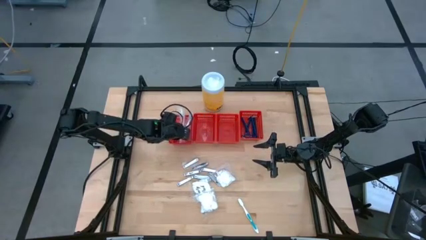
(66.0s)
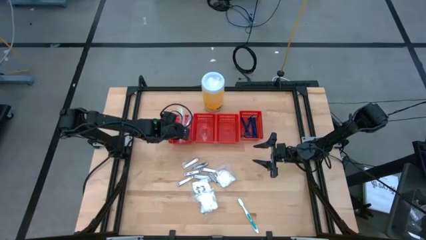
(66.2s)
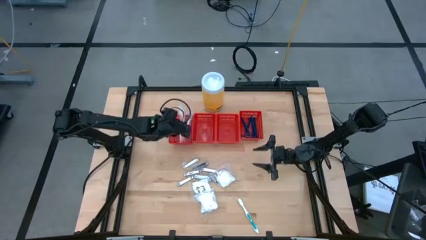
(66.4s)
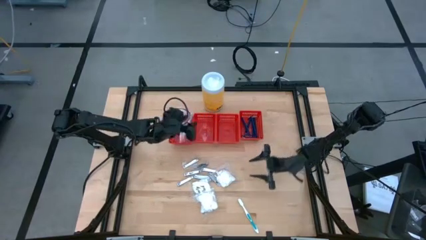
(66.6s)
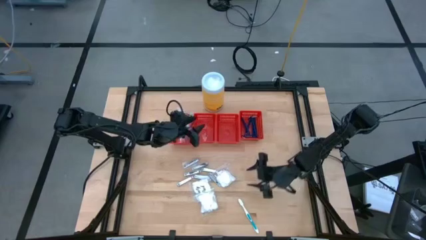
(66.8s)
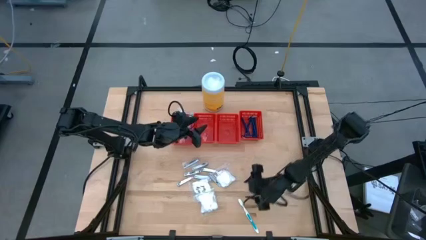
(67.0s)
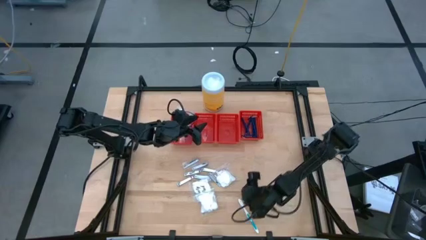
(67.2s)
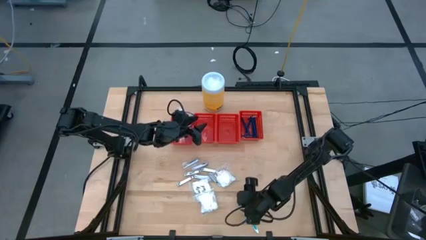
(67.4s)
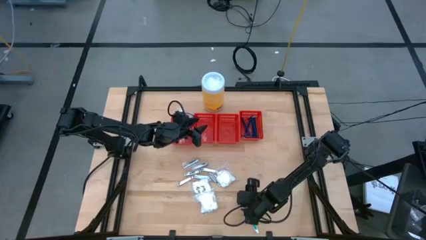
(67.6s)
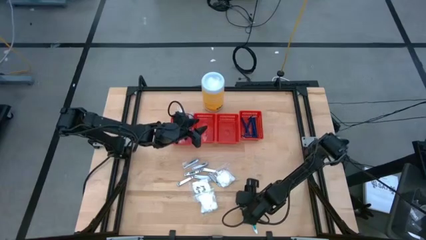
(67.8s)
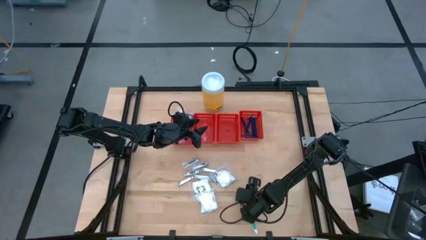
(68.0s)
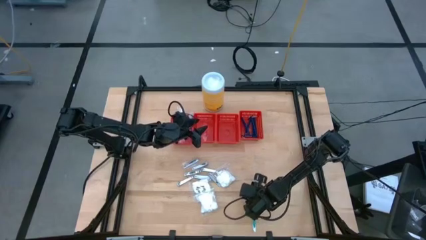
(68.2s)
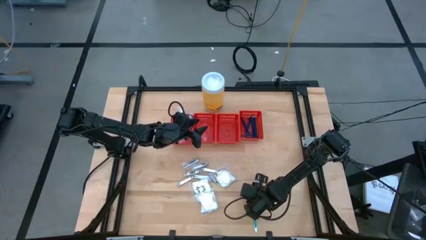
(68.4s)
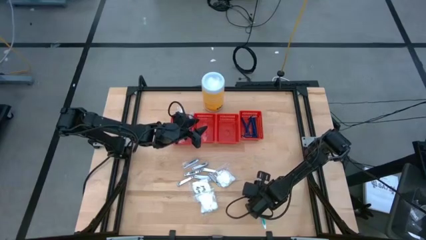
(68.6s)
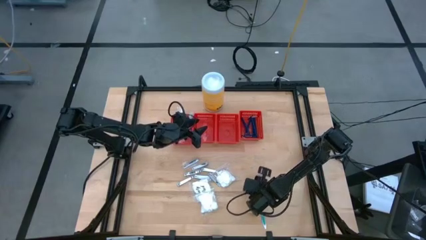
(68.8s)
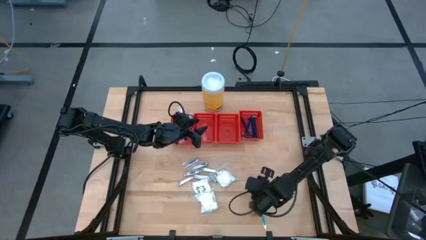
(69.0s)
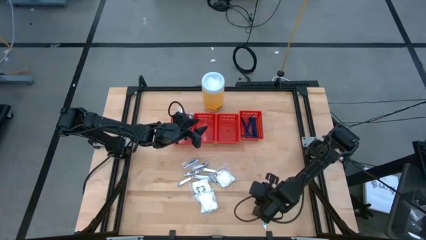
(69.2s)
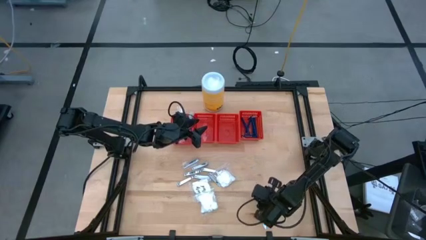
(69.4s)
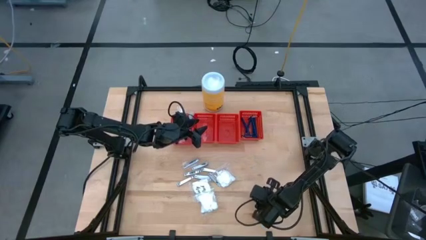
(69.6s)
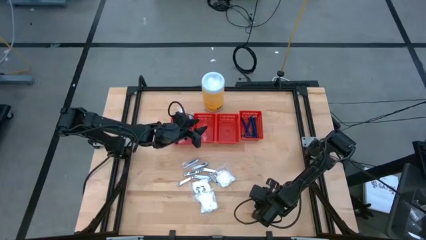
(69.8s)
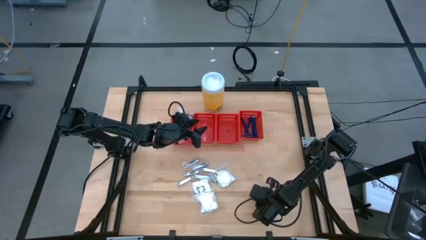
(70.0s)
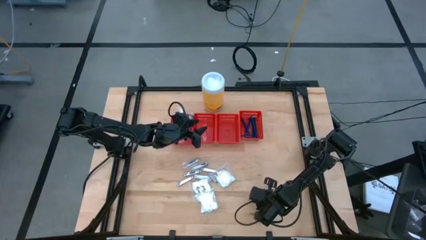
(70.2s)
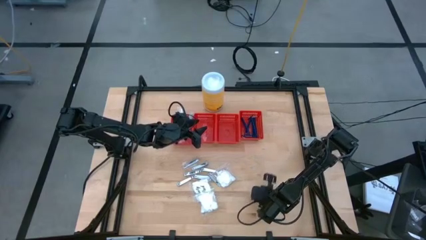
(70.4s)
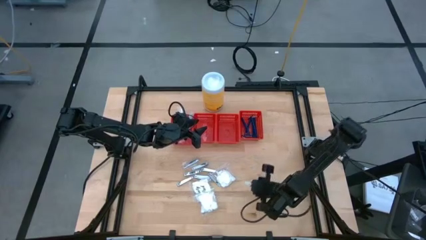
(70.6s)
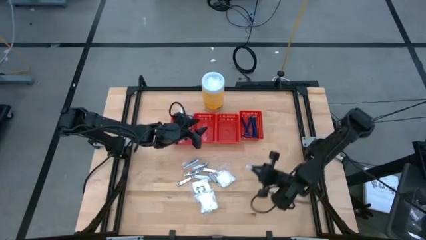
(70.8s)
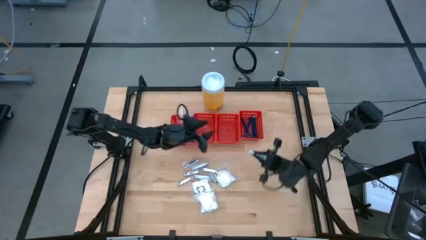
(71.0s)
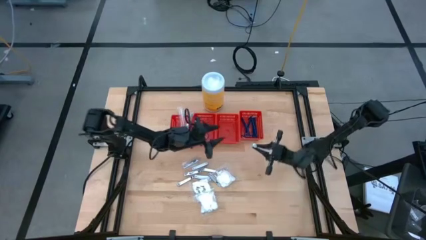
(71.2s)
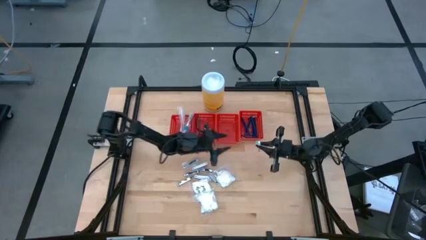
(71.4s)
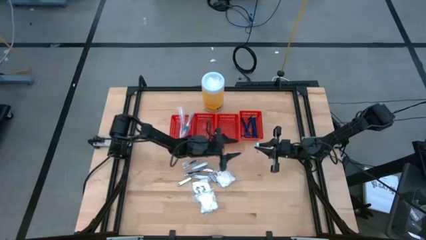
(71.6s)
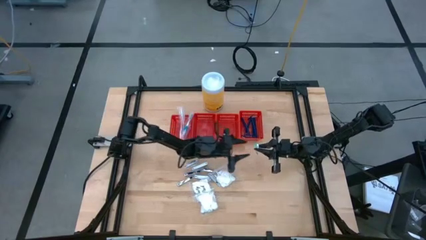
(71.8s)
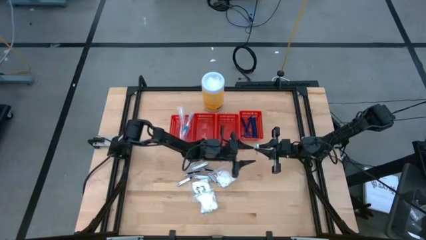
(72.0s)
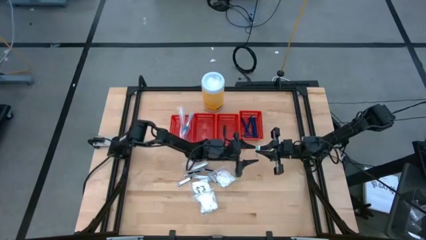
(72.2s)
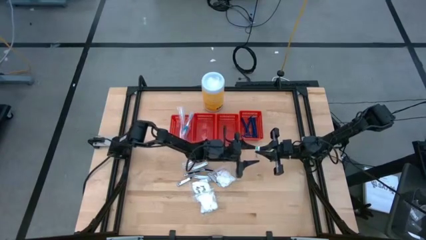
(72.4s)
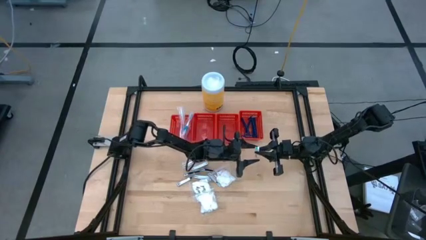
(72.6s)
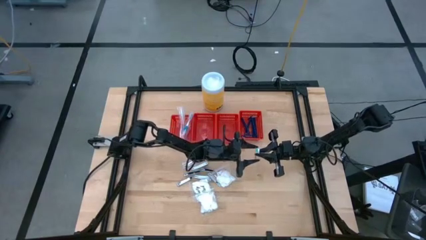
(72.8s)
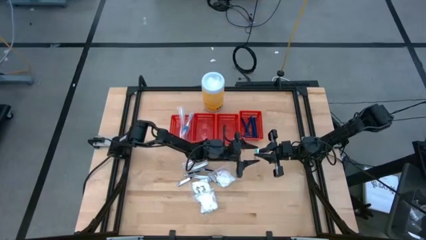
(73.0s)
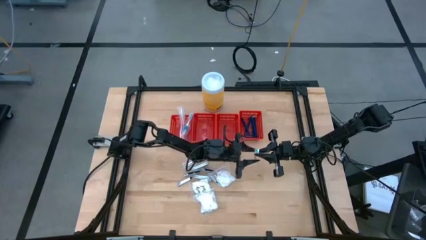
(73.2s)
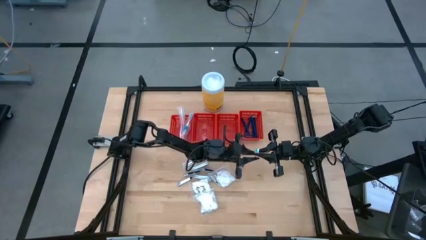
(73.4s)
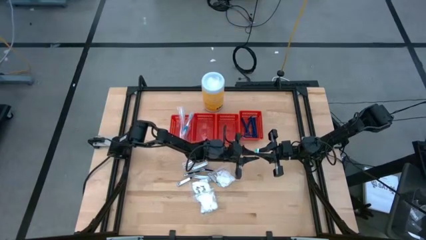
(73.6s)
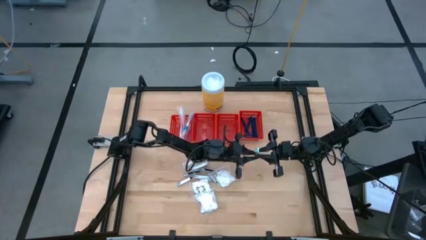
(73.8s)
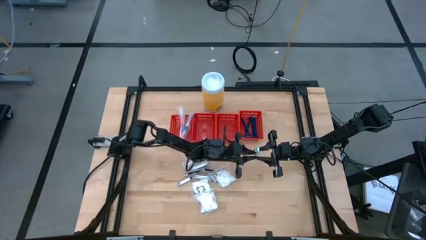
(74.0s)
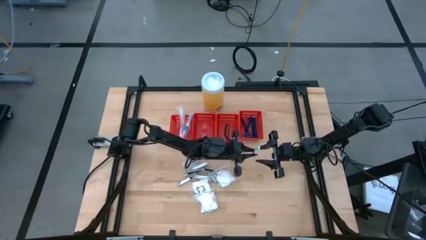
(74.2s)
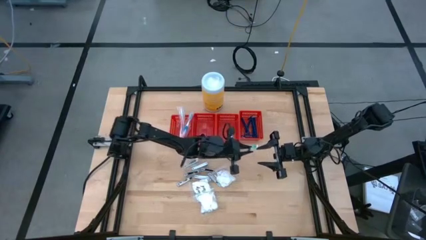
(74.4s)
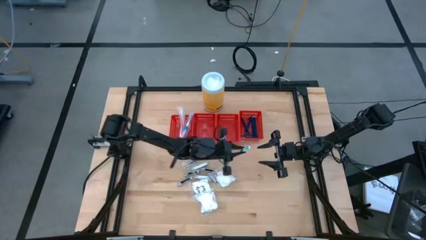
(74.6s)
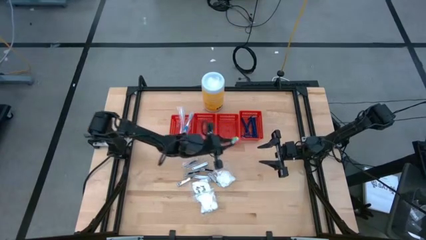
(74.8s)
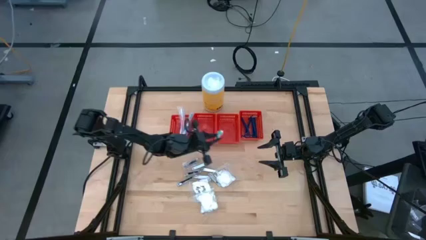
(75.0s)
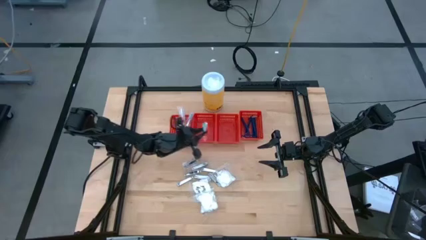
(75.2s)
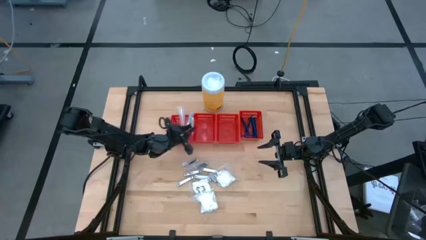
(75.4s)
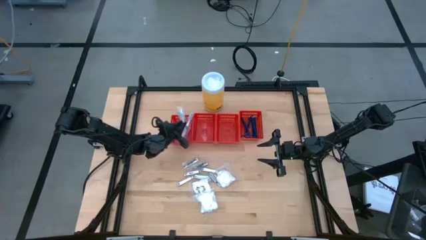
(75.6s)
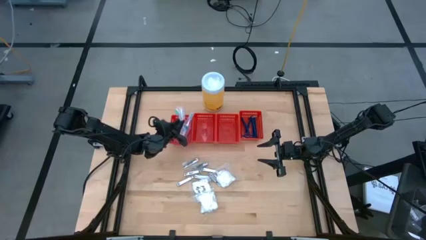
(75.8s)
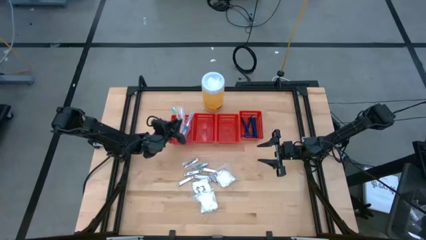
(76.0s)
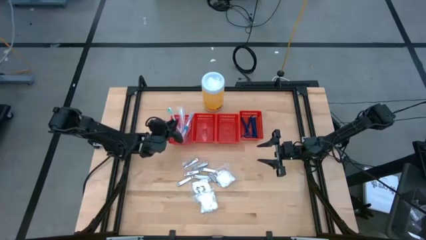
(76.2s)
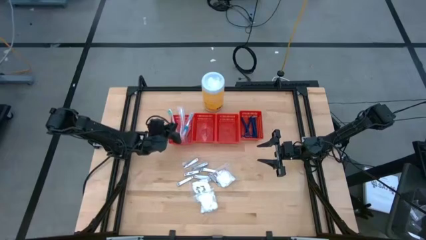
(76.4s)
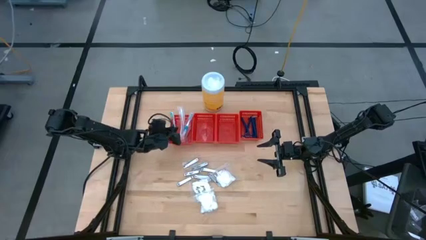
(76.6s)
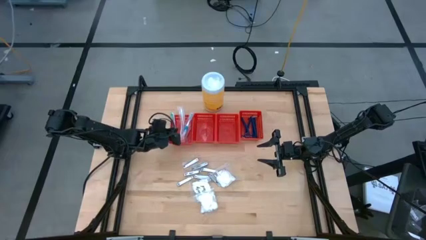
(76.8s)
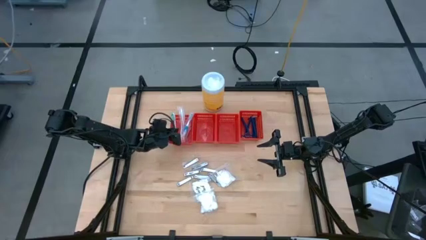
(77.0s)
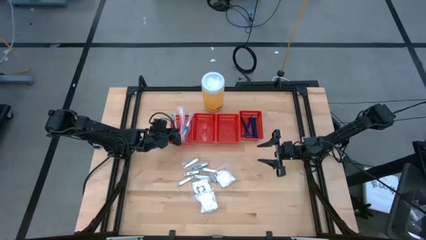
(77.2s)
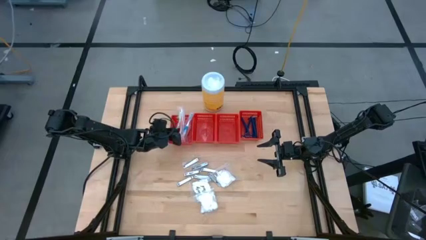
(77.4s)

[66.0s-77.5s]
Task: Pick & Place Travel size toiletries
Put the green toothbrush in the left red basket

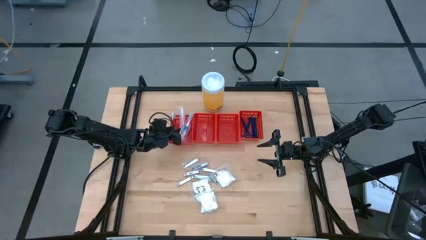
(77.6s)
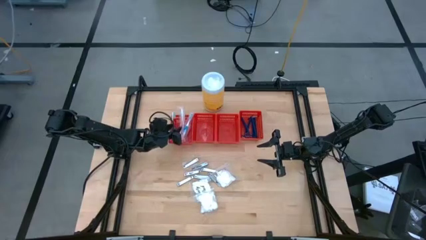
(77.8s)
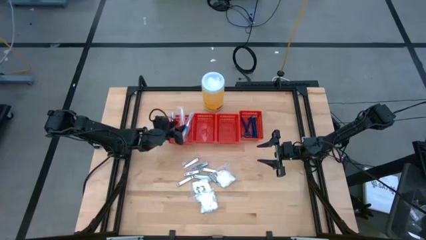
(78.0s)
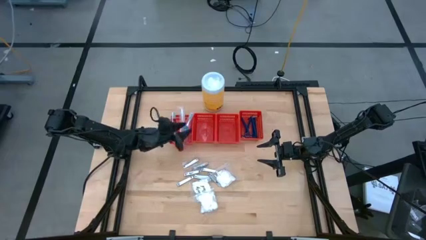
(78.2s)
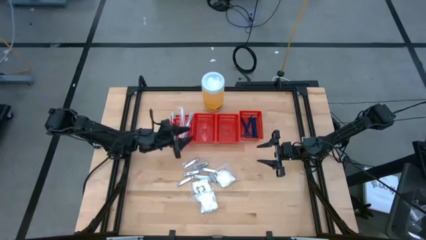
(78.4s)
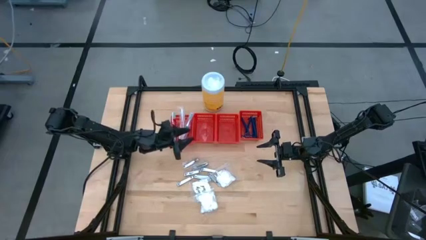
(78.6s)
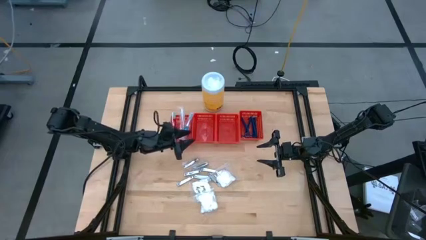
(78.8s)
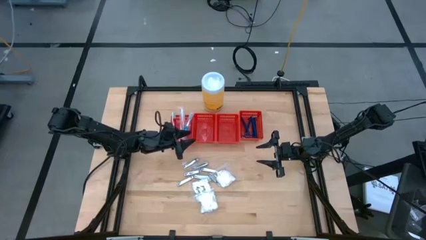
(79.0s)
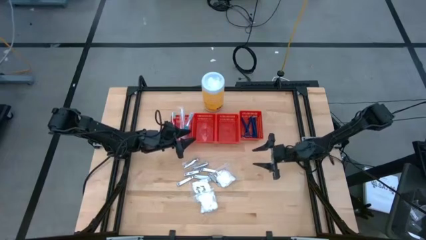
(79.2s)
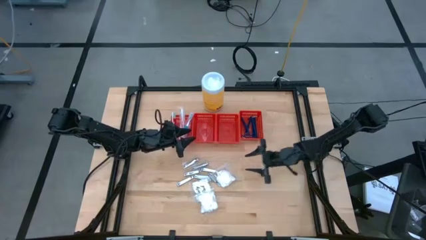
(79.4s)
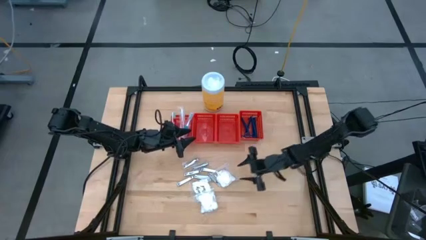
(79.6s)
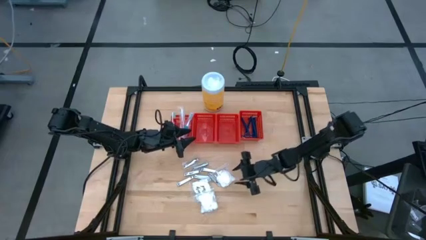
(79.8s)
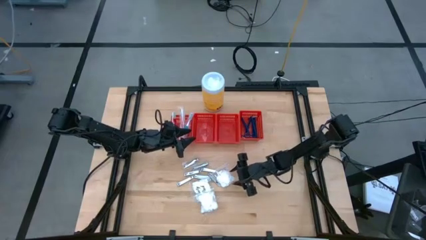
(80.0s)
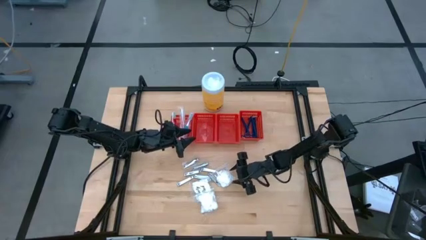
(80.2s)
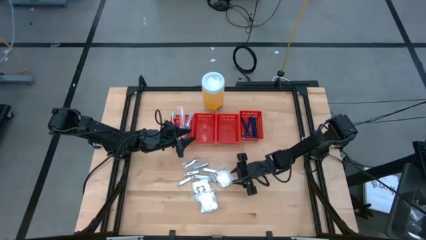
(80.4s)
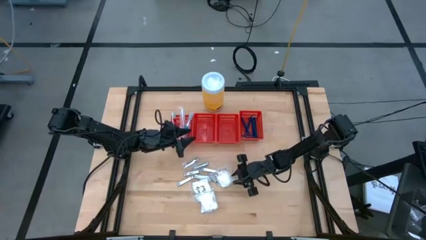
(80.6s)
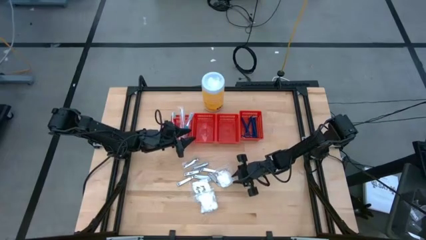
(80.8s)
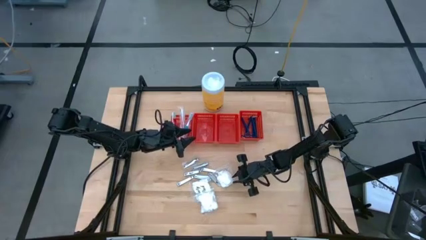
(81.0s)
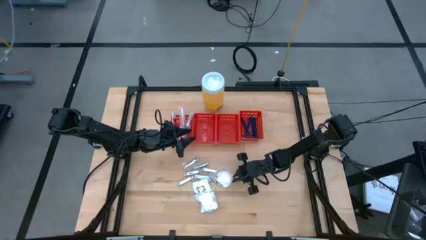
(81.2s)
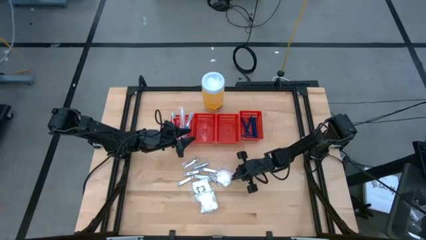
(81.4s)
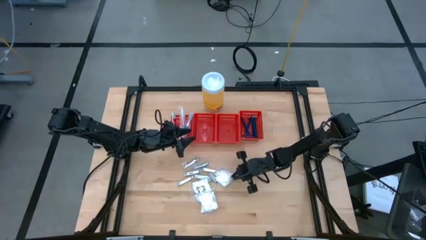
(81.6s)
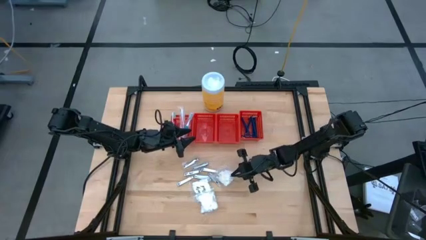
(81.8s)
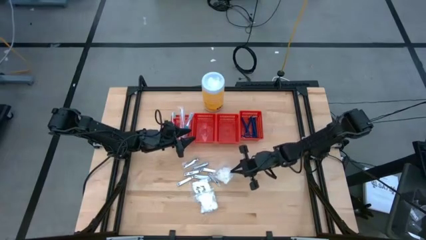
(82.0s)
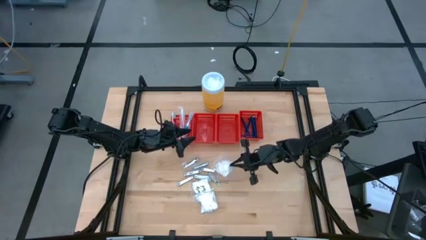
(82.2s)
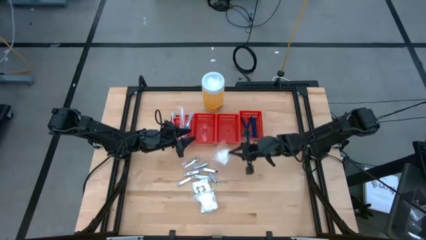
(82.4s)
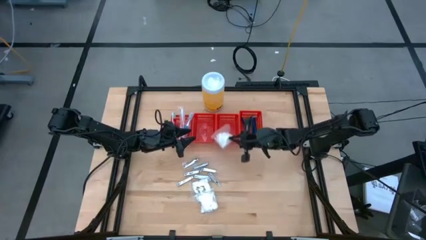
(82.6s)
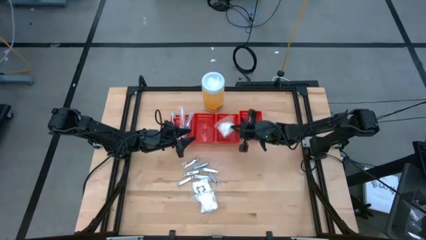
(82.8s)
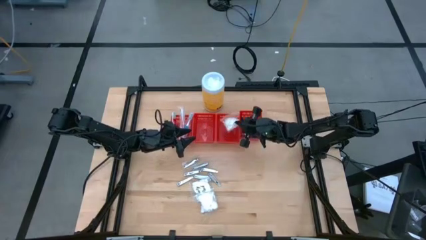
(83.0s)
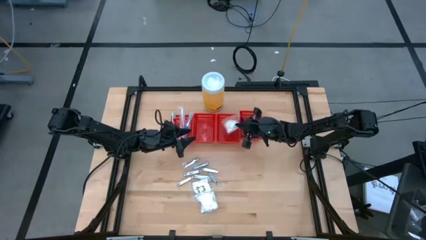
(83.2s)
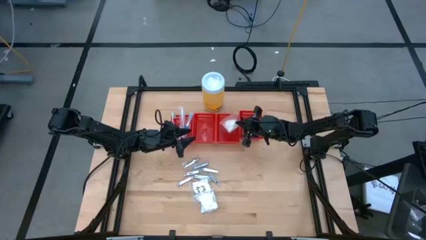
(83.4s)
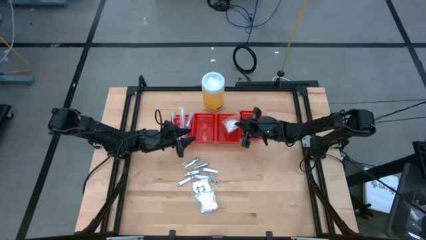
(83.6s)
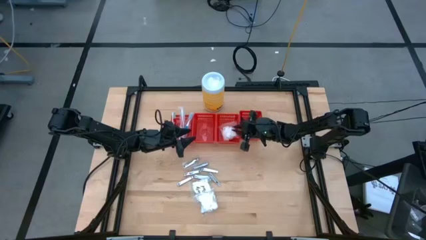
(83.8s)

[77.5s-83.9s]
Put the cotton pack into the middle right red basket
